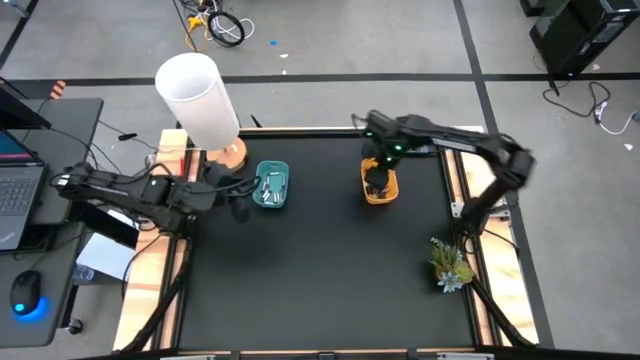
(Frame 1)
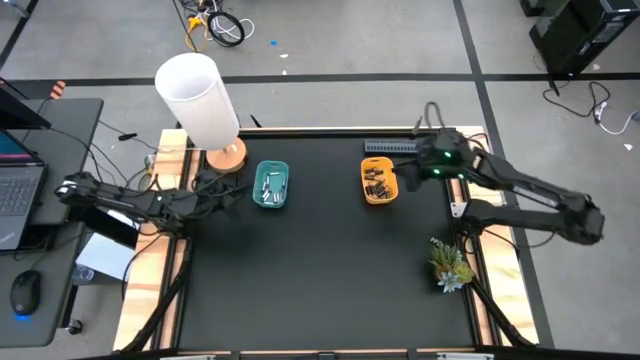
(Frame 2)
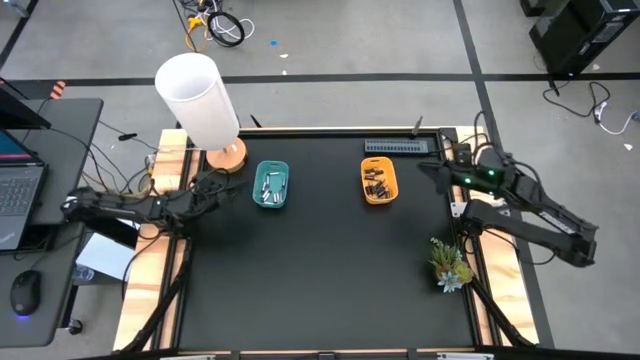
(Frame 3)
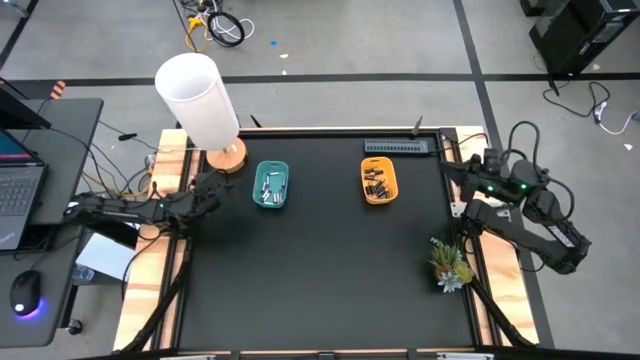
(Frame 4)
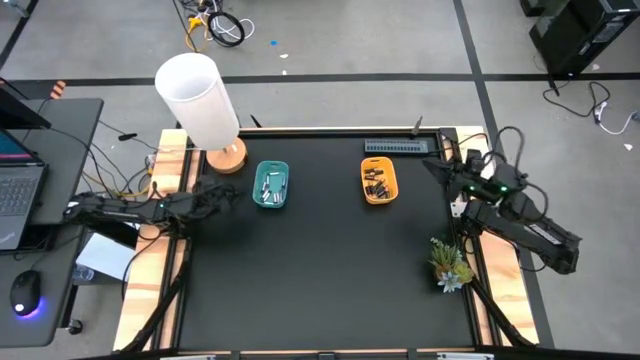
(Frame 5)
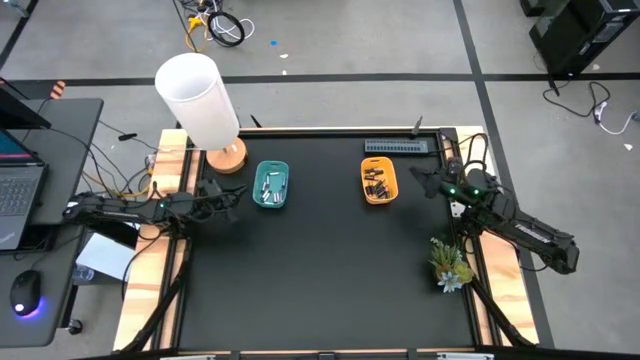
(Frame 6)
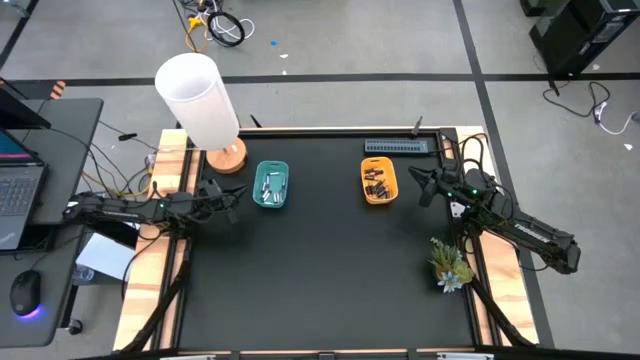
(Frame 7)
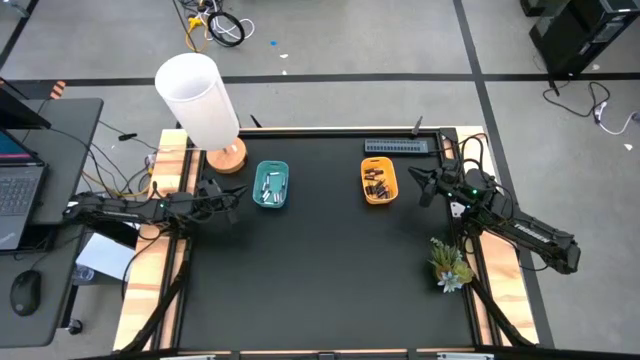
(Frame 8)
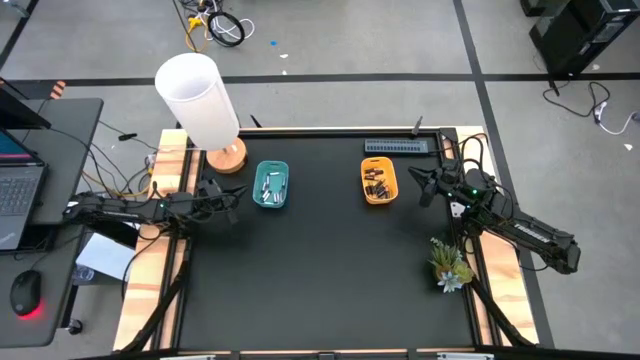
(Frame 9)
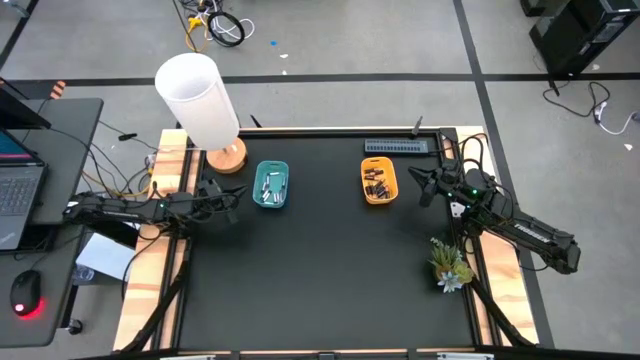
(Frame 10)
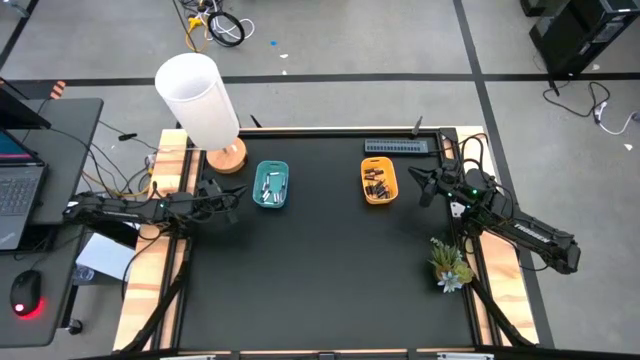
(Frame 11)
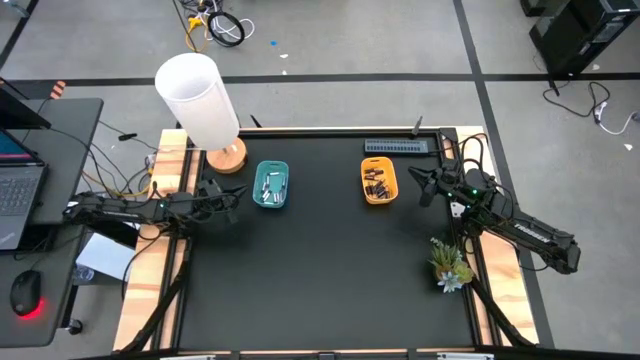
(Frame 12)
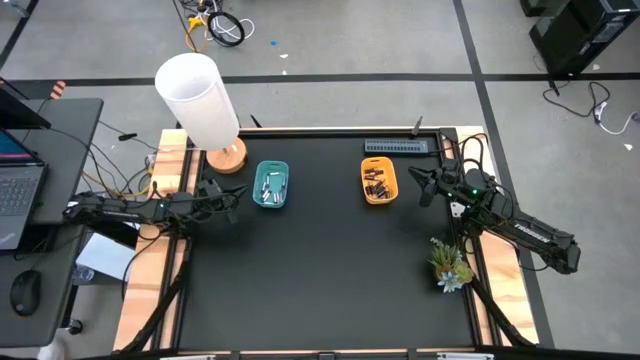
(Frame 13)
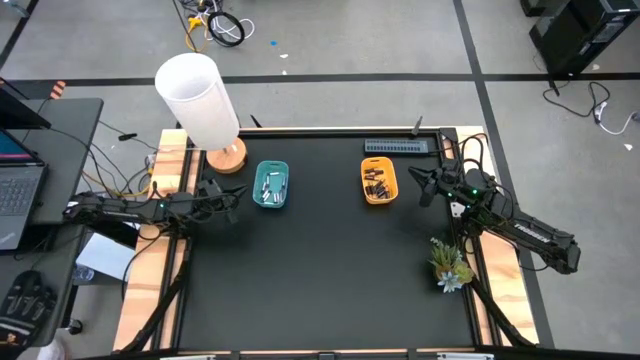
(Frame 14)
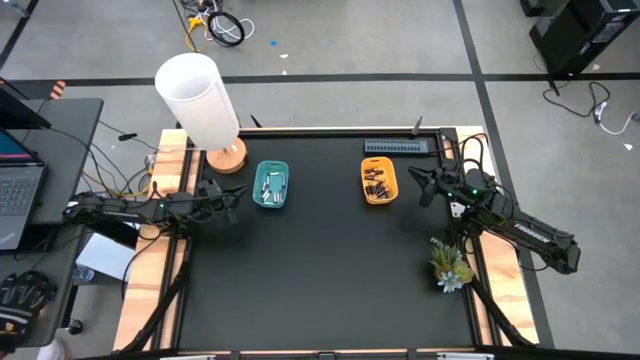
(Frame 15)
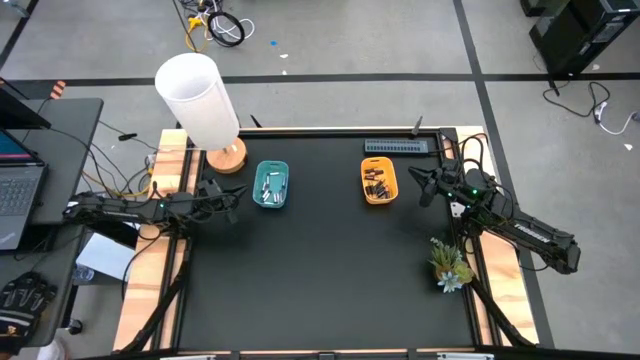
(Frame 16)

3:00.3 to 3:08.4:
Task: Sort batteries
Return to Home Position

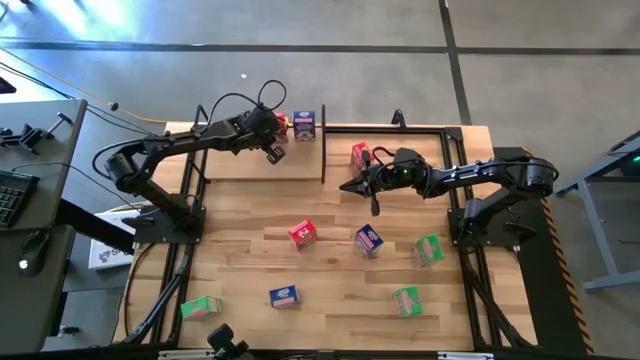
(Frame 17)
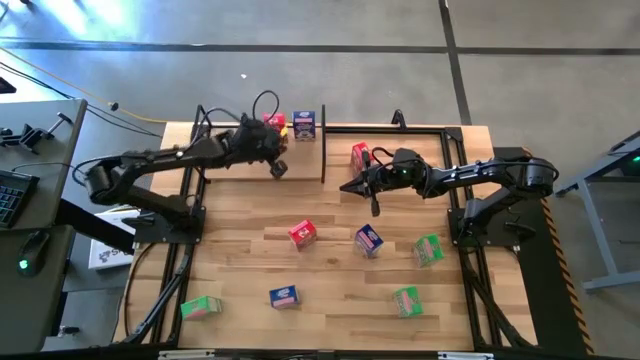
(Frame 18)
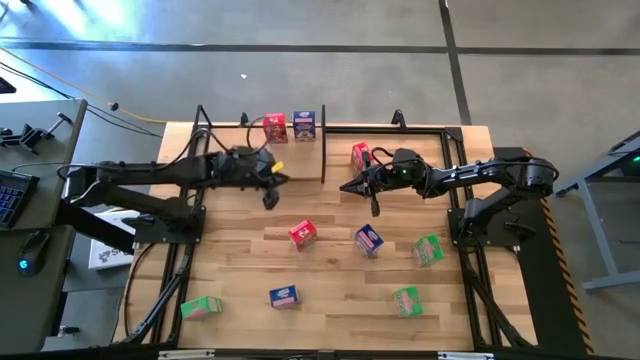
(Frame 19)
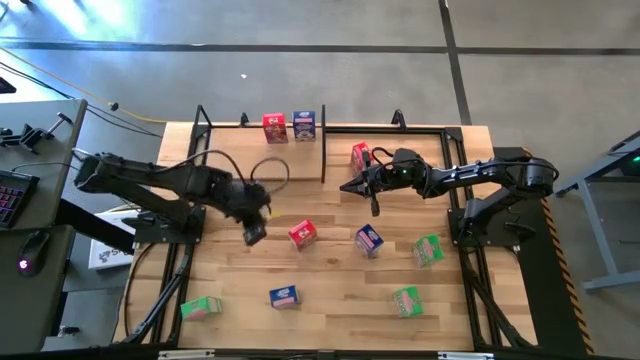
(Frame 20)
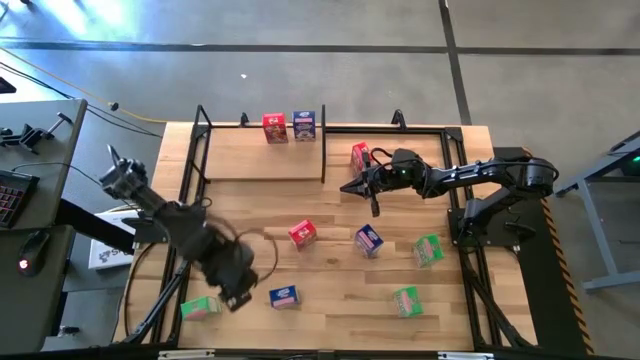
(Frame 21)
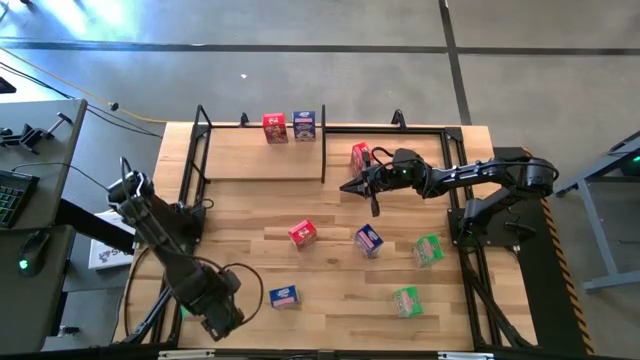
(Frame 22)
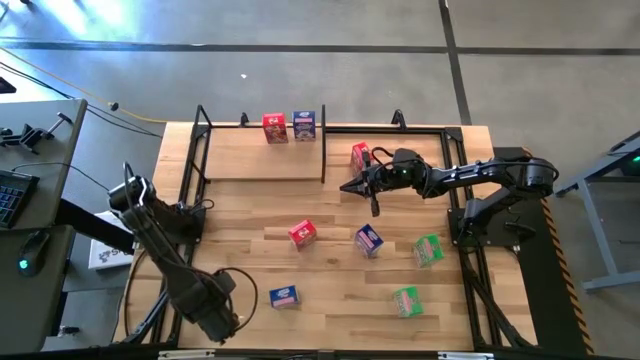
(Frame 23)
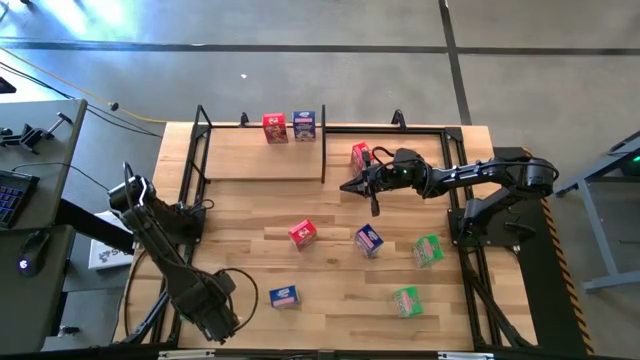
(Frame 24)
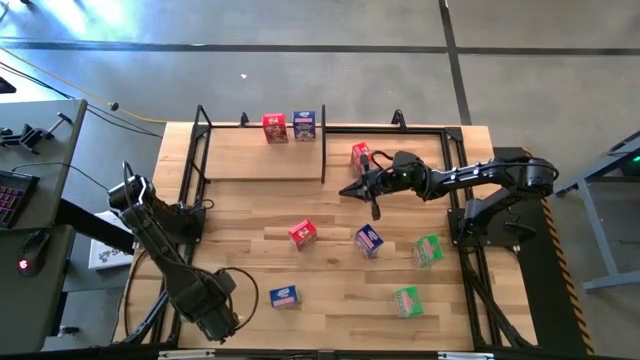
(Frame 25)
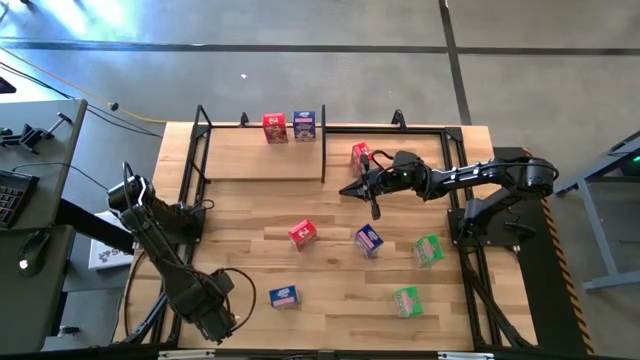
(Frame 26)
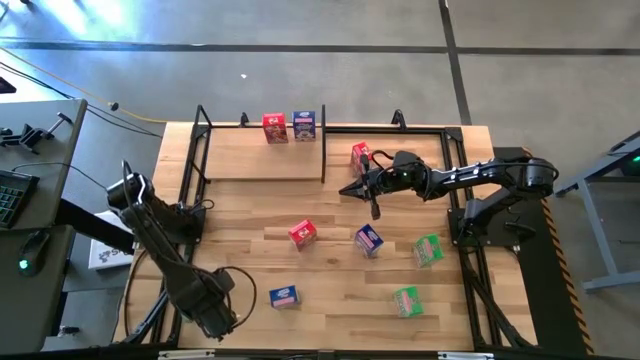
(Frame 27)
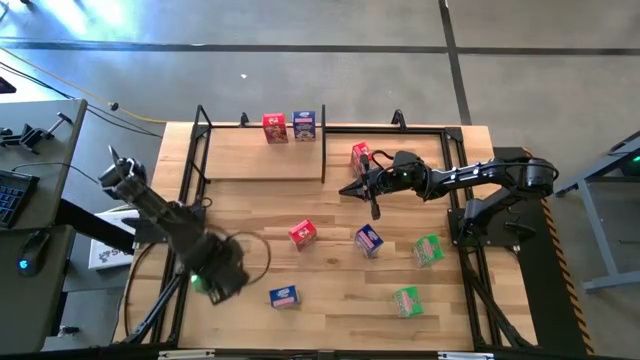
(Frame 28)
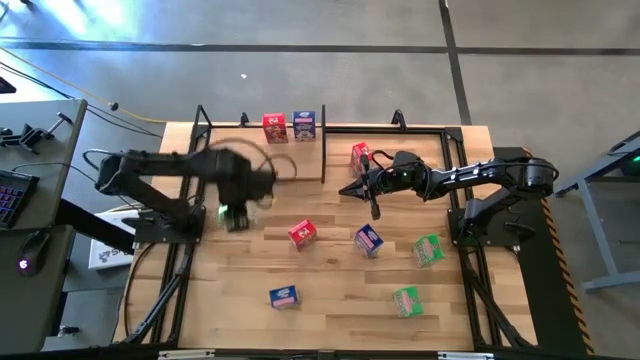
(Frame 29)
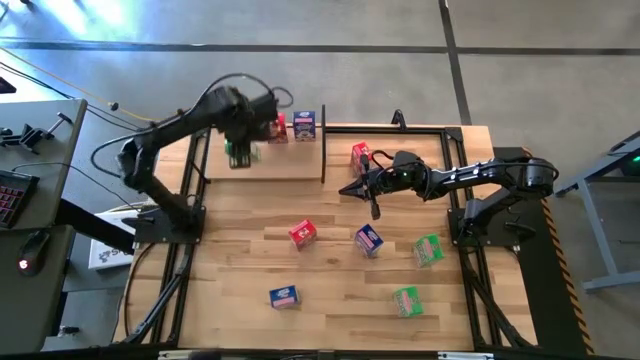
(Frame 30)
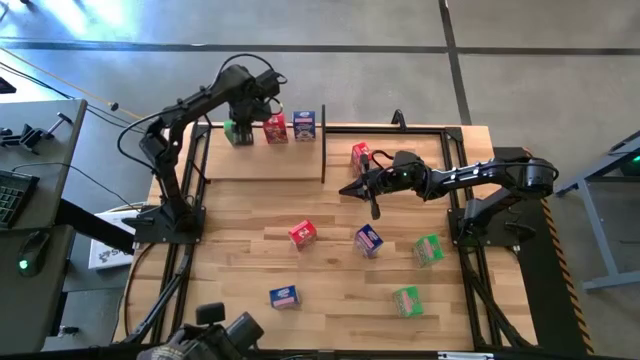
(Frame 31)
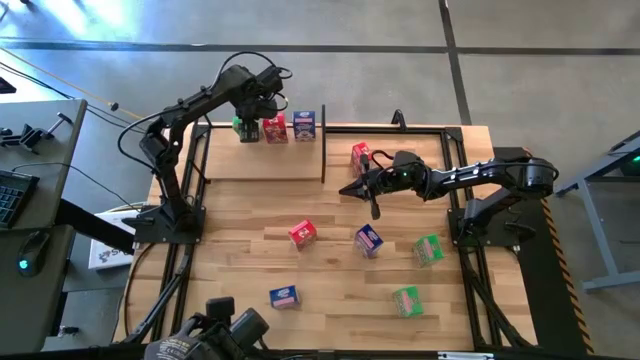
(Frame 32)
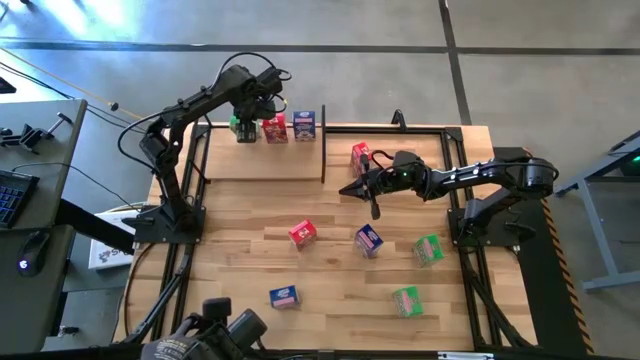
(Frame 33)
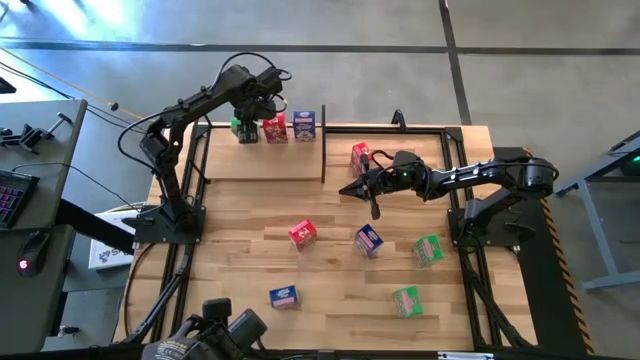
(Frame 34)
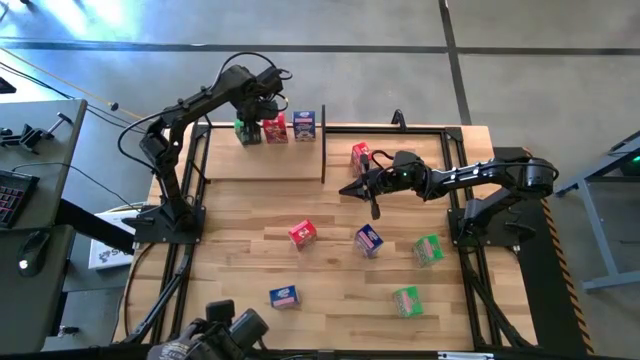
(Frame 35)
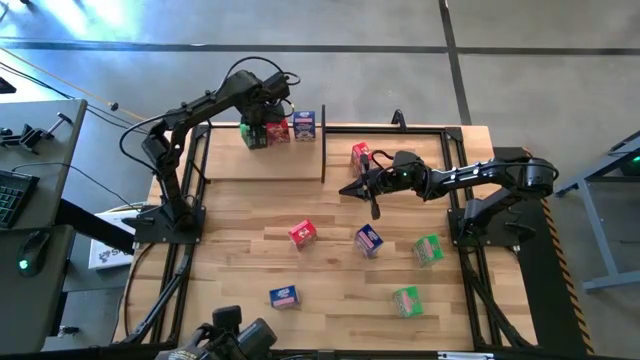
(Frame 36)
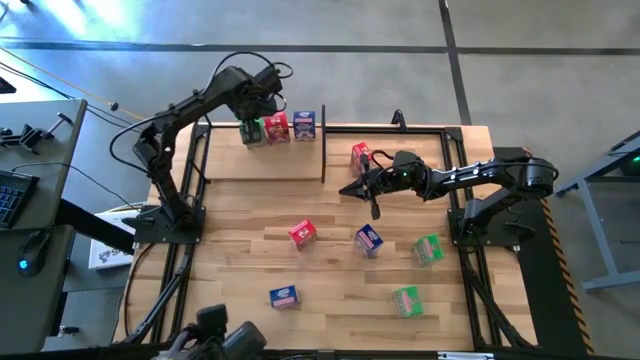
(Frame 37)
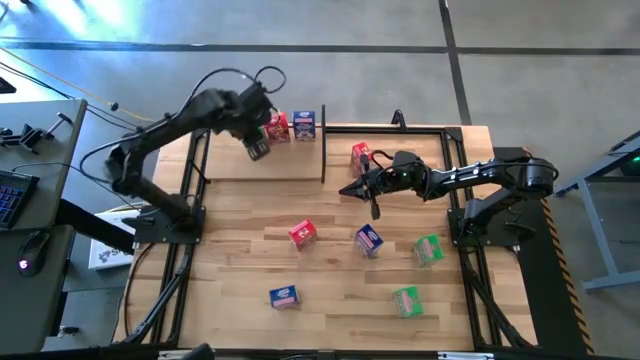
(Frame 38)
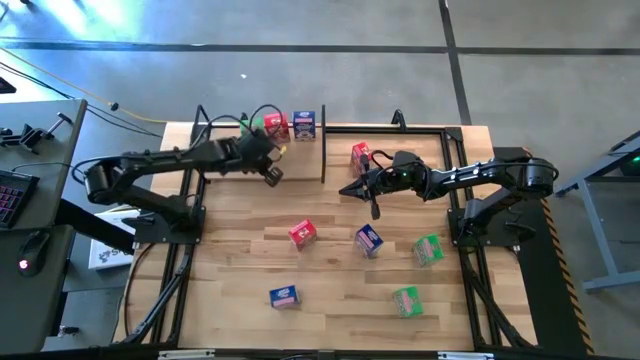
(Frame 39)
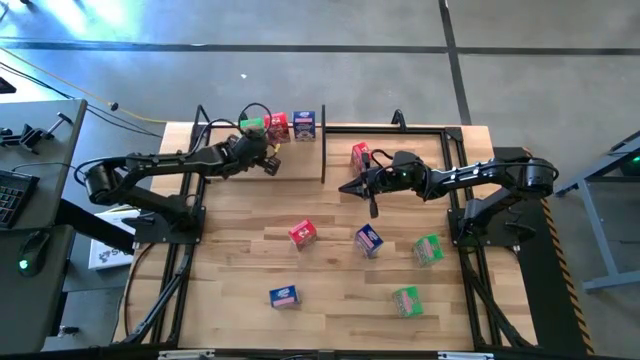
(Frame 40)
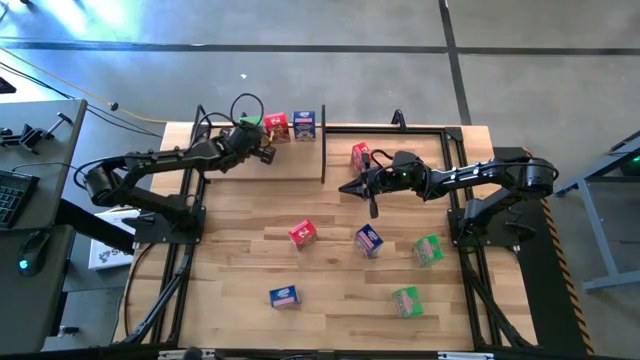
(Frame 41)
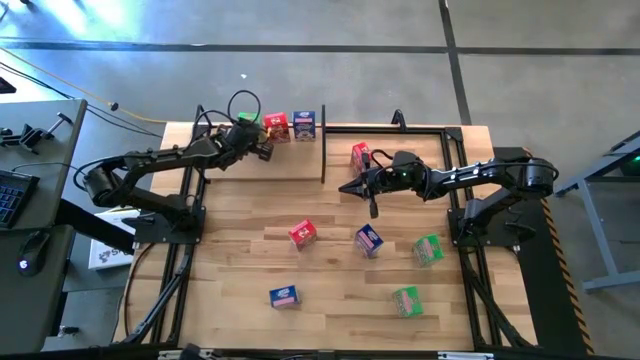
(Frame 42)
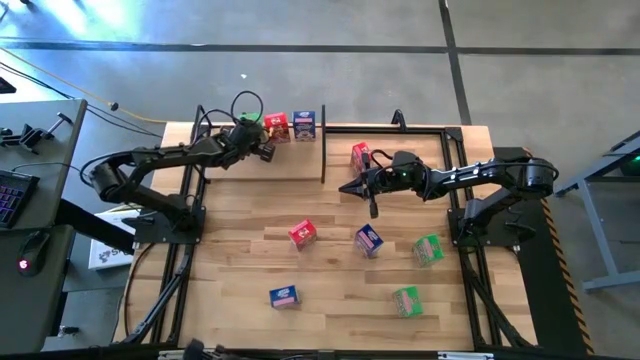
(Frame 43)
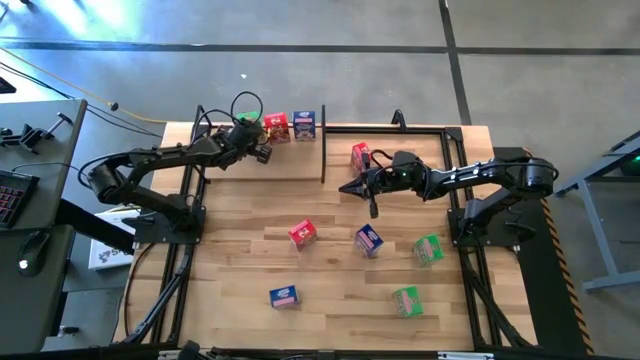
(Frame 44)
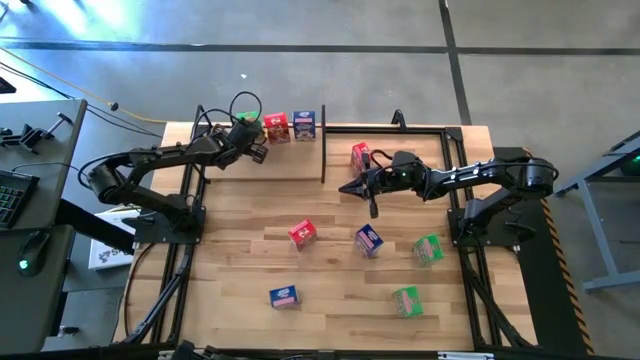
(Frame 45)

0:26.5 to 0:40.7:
Task: Stack cereal on shelf
Put the bottom left green cereal box on the shelf

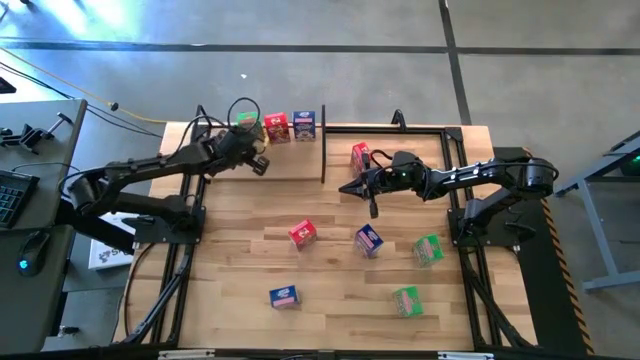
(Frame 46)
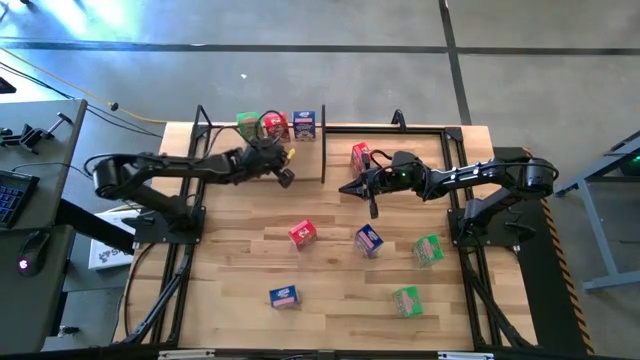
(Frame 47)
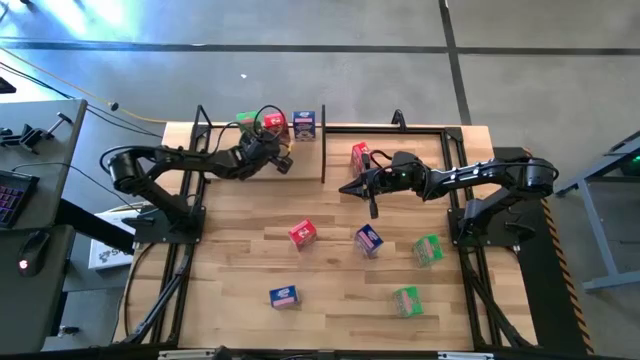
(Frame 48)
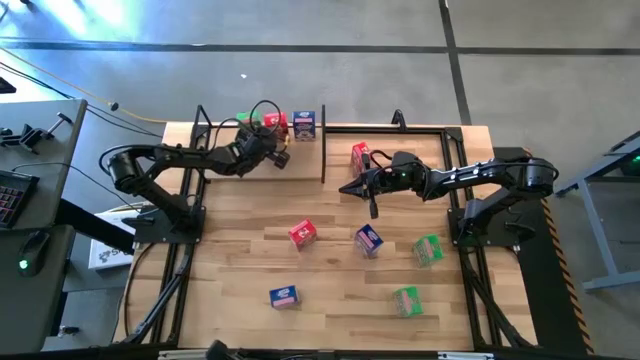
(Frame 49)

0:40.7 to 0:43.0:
Adjust the red cereal box on the shelf
